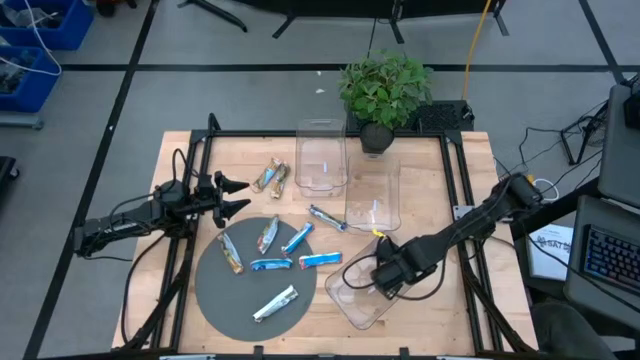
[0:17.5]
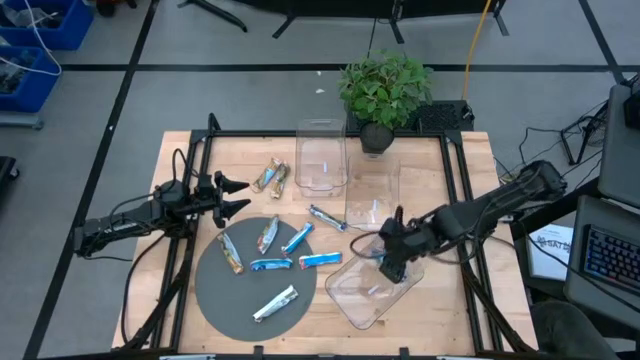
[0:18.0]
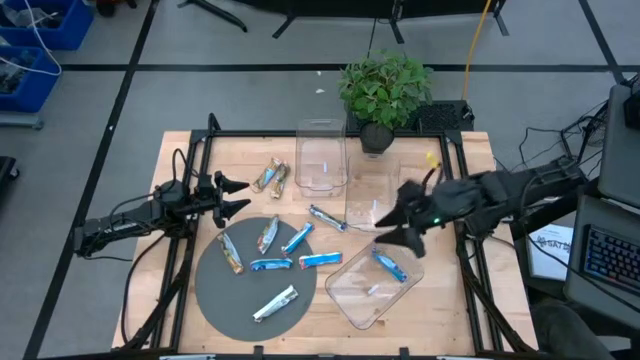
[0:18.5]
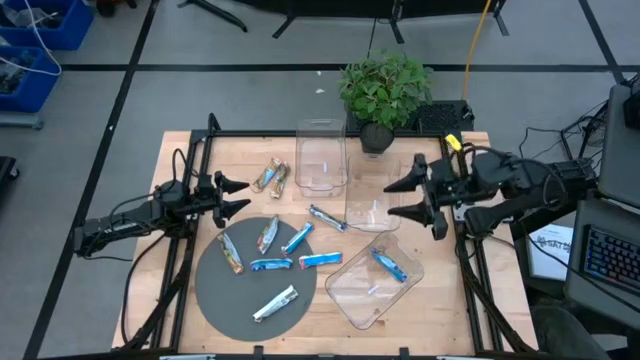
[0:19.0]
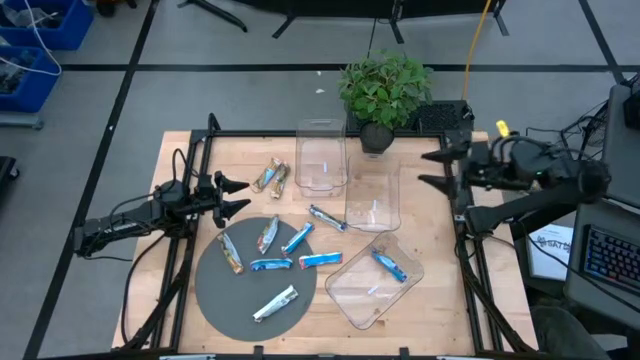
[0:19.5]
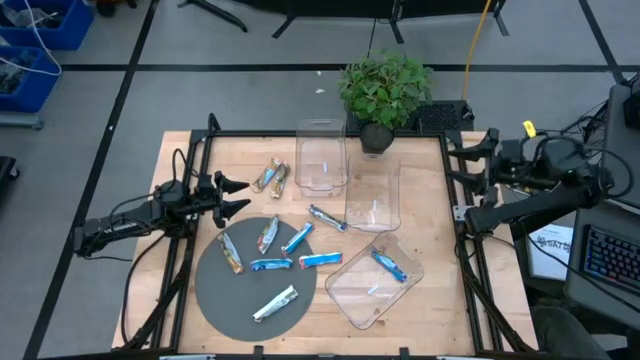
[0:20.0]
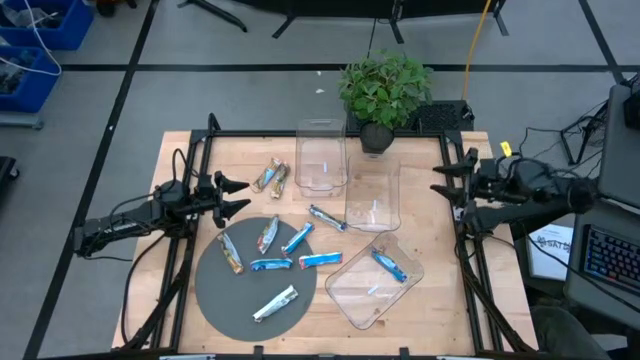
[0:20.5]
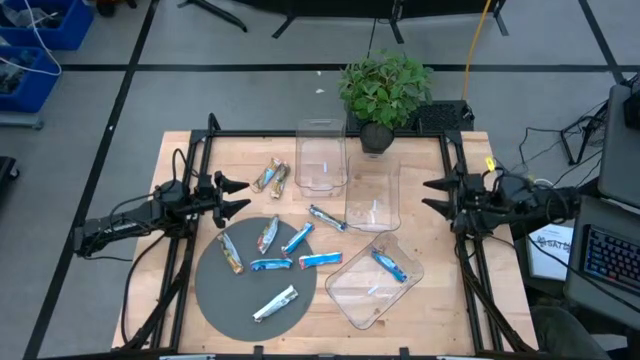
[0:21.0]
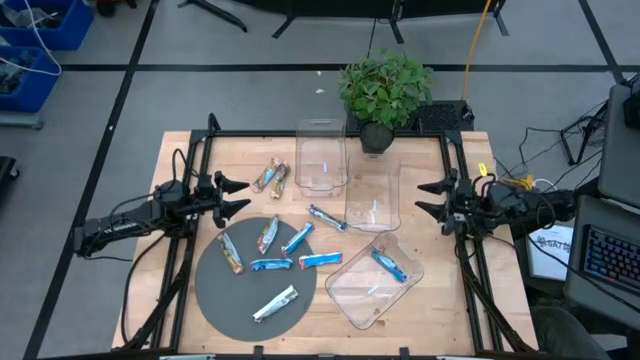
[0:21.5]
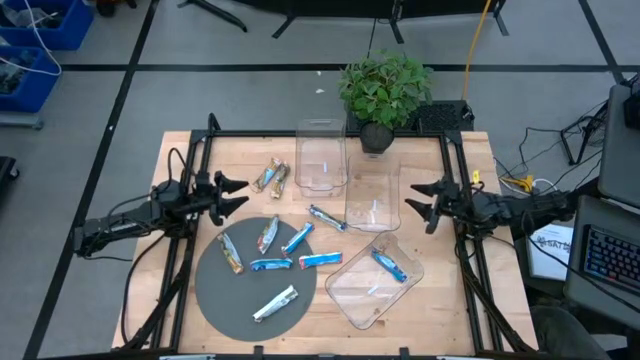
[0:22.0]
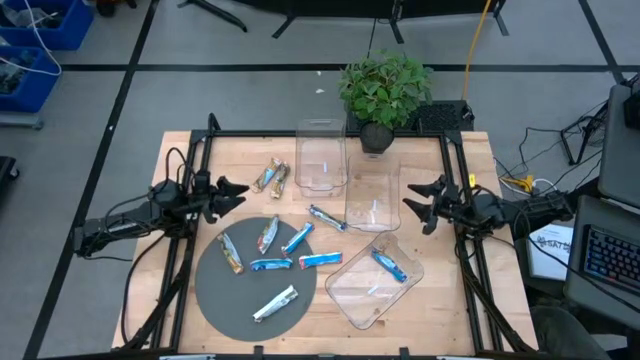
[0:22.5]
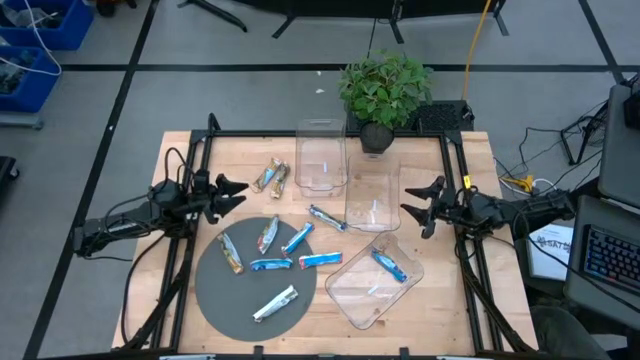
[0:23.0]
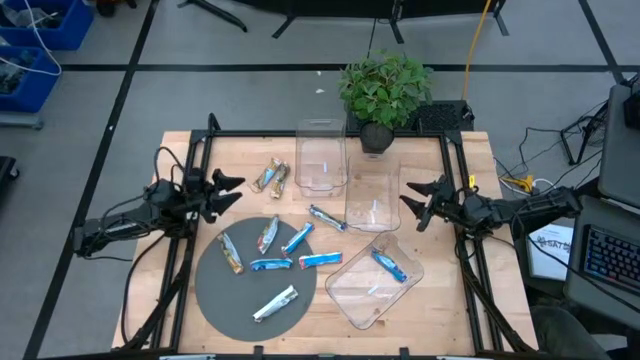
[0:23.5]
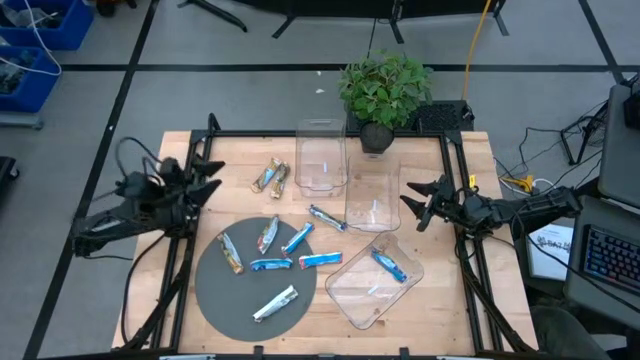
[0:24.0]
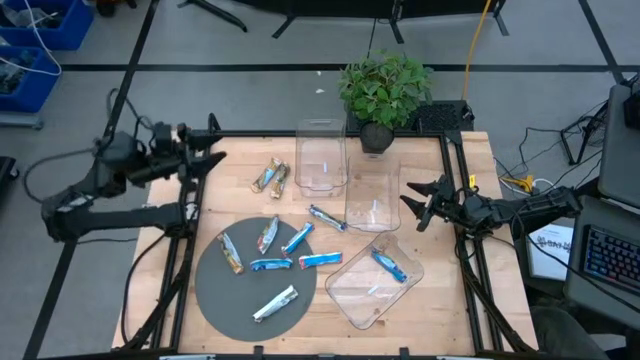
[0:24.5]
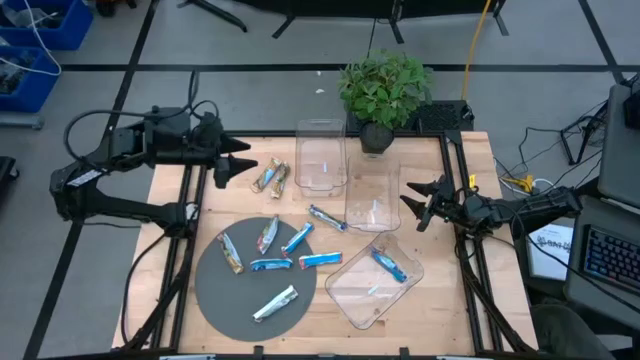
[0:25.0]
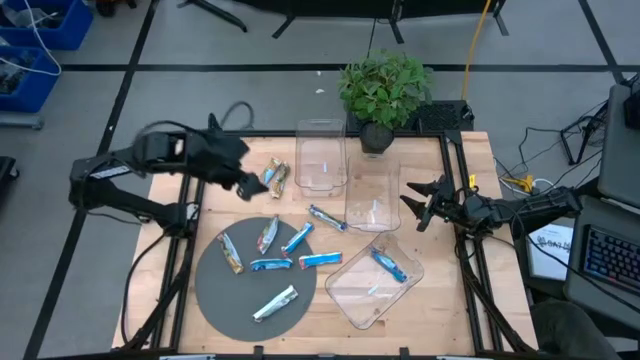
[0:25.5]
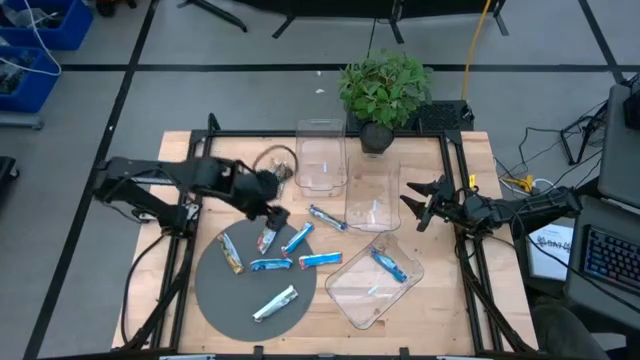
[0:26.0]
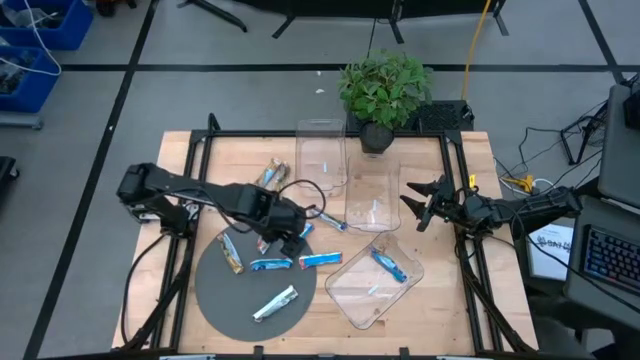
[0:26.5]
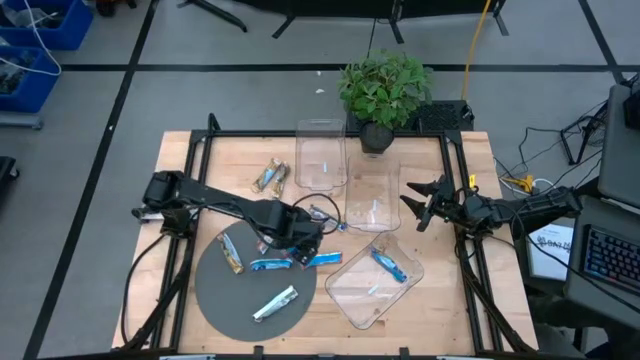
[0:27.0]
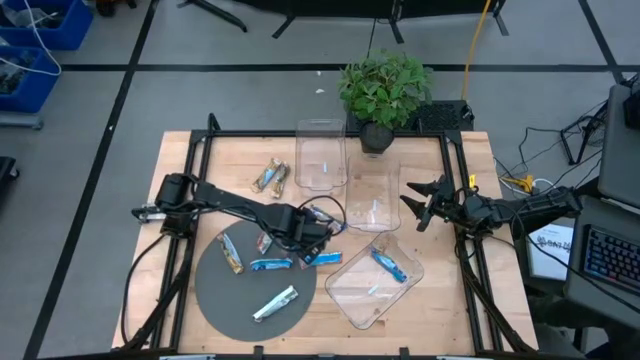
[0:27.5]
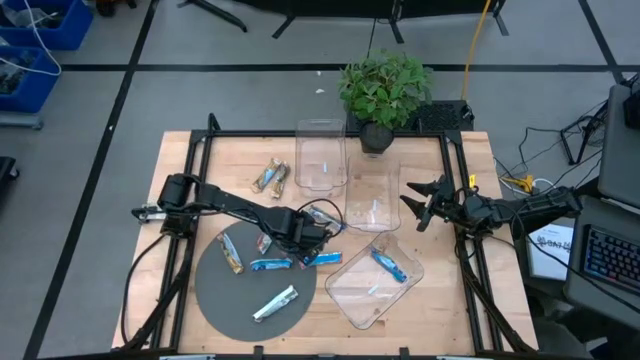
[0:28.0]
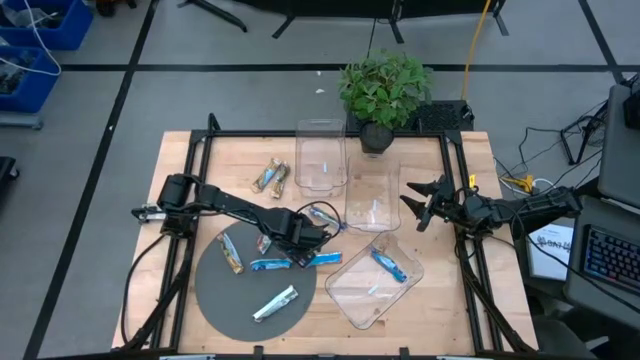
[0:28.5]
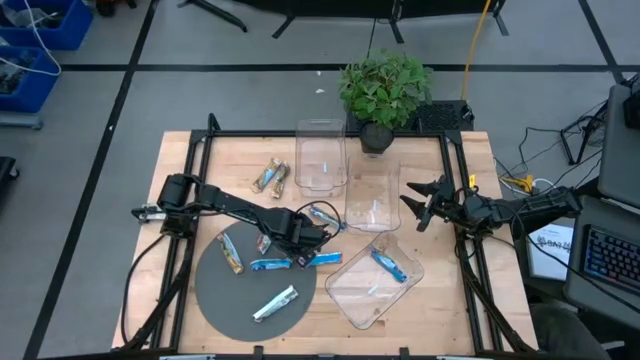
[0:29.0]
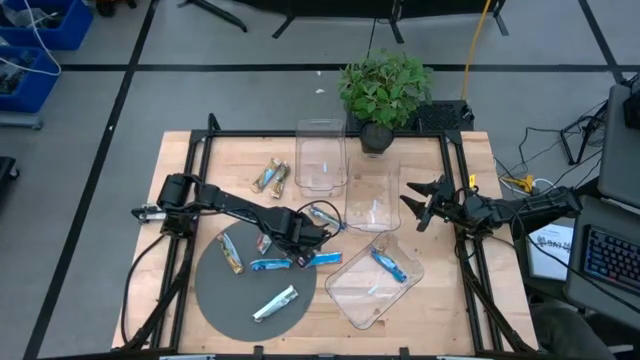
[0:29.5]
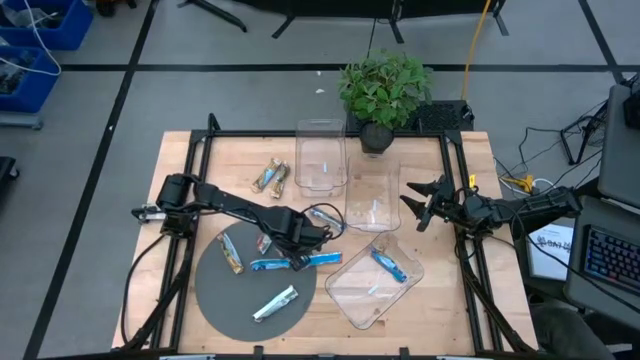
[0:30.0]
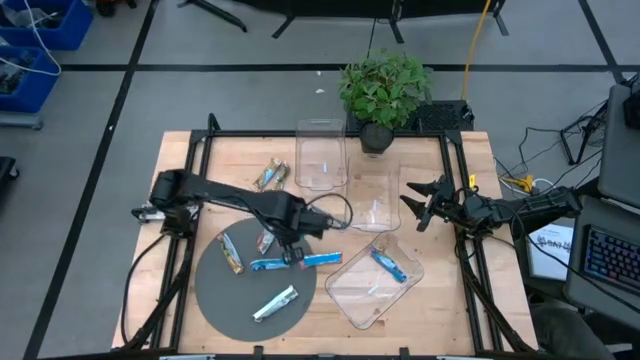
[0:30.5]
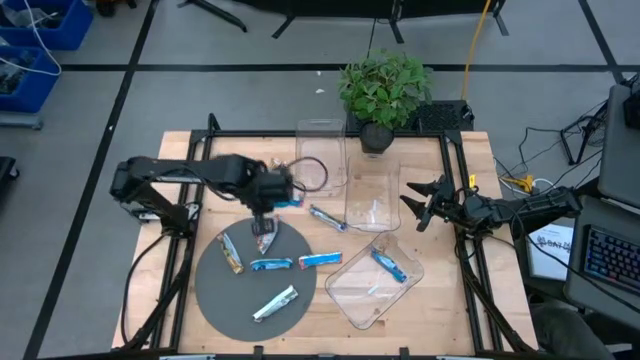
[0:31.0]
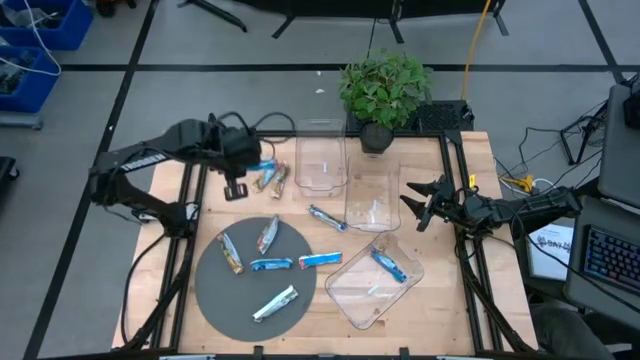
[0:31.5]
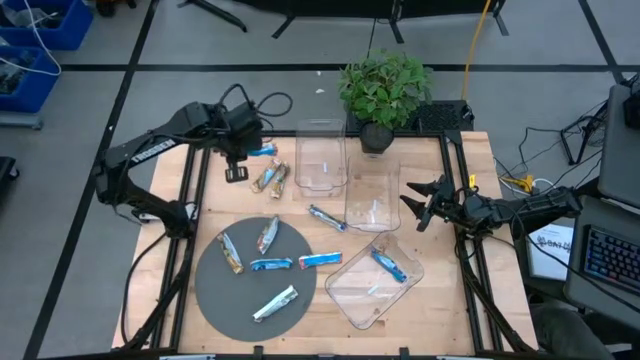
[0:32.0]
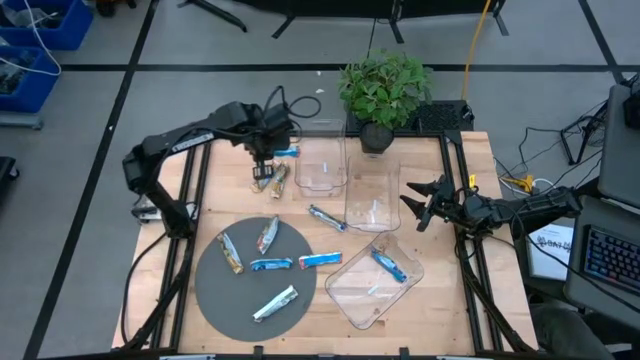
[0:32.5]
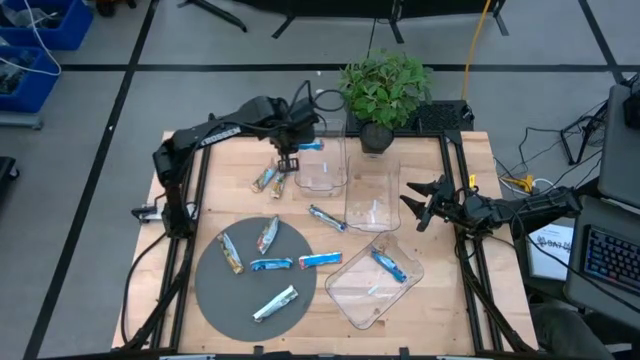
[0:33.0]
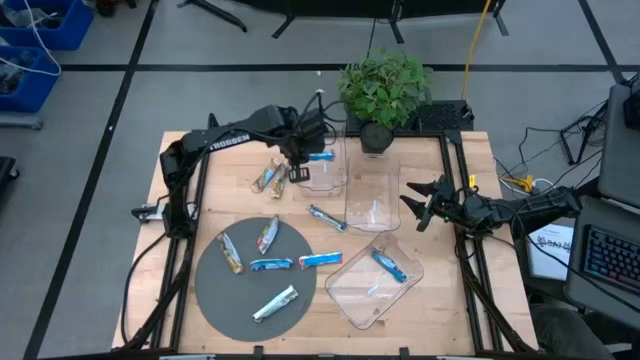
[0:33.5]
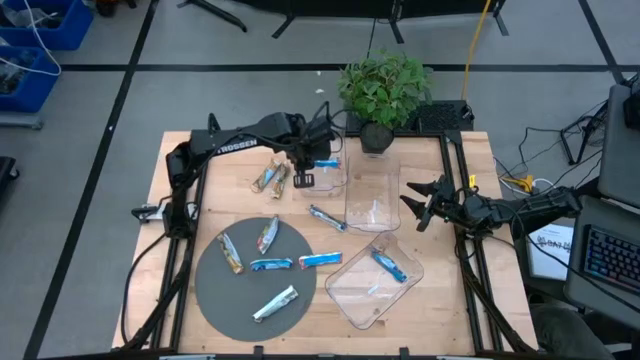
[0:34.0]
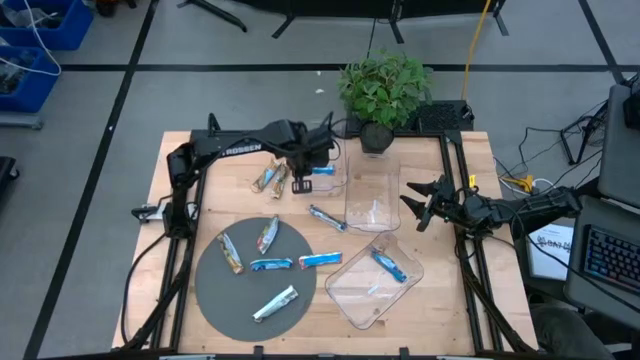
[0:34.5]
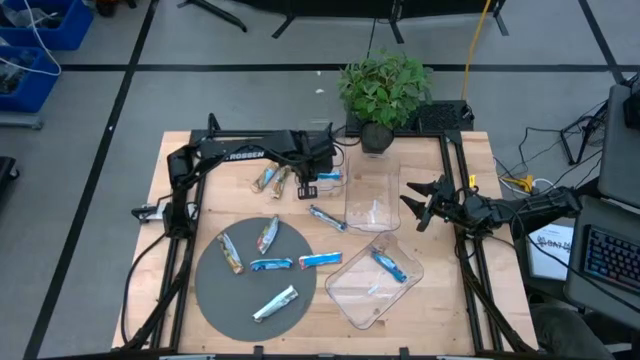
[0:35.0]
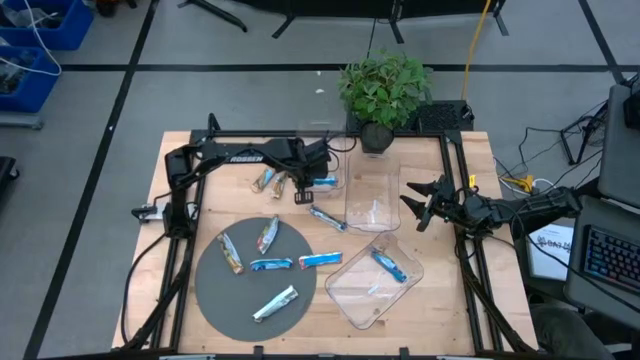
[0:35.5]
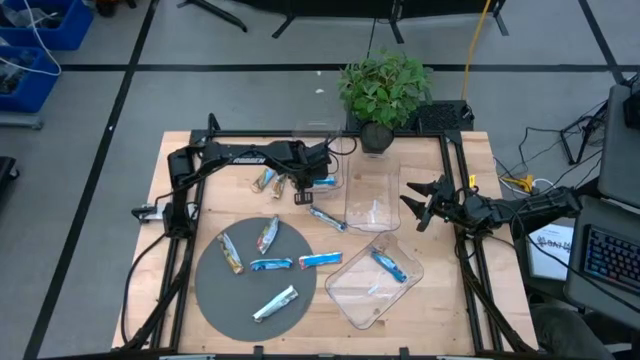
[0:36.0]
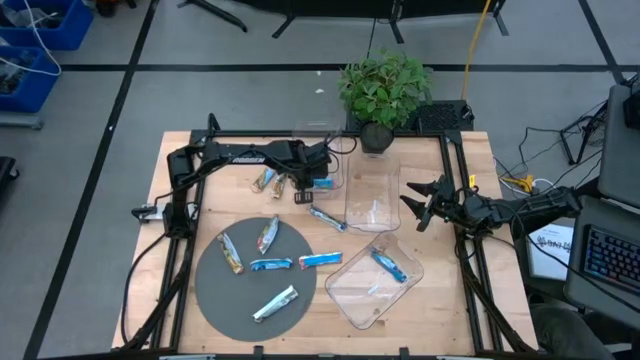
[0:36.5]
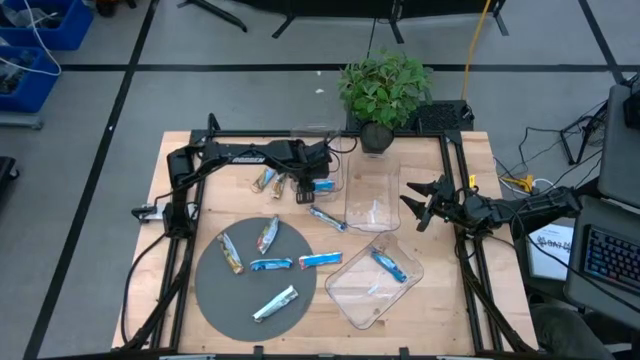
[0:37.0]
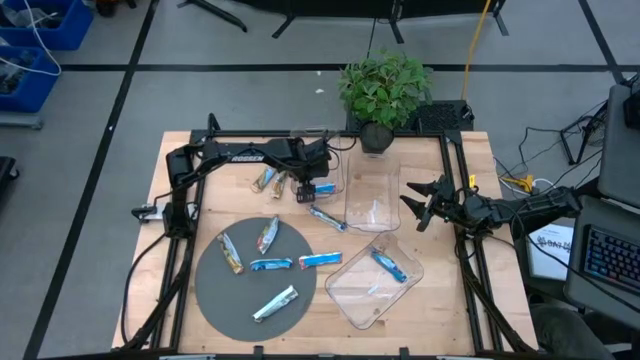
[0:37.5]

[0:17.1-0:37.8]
Task: Pick and place Granola Bars by type
Put the red granola bar into the top transparent bin
